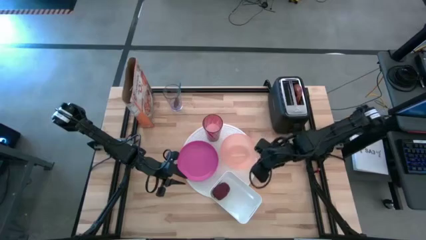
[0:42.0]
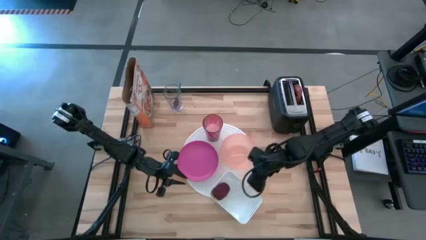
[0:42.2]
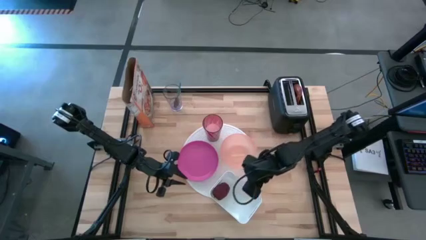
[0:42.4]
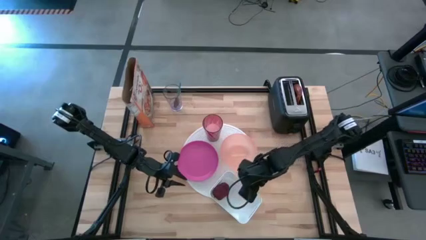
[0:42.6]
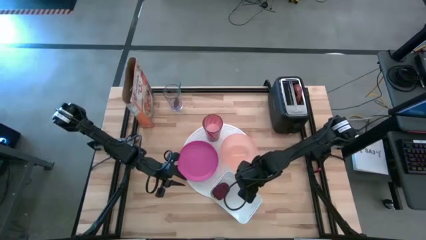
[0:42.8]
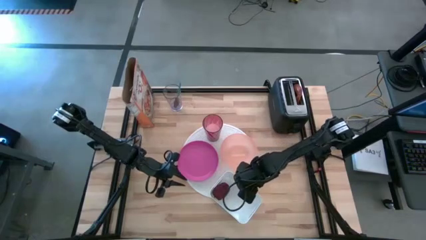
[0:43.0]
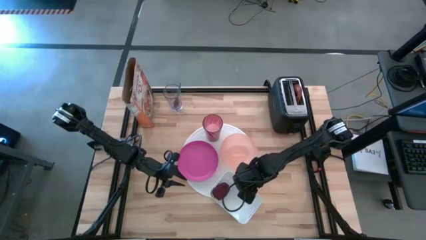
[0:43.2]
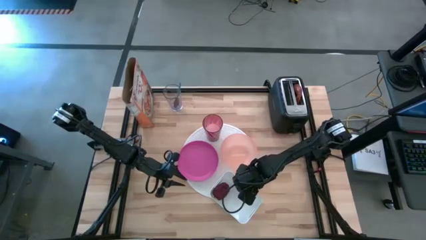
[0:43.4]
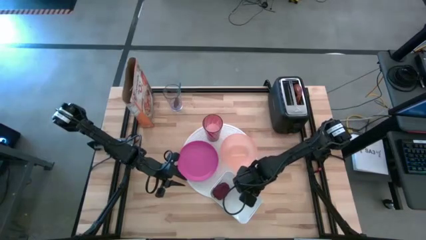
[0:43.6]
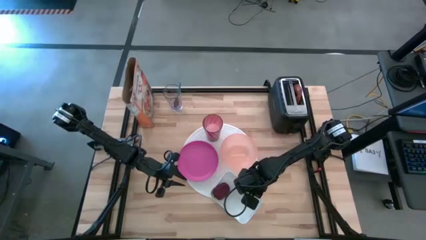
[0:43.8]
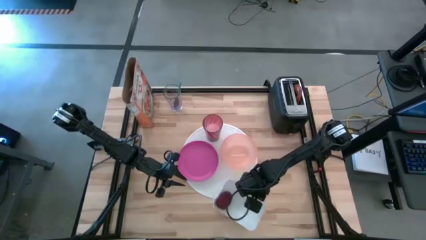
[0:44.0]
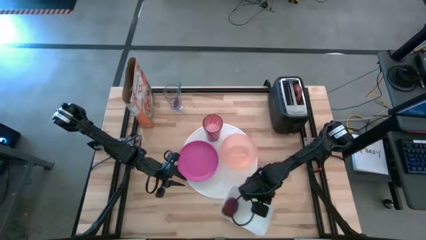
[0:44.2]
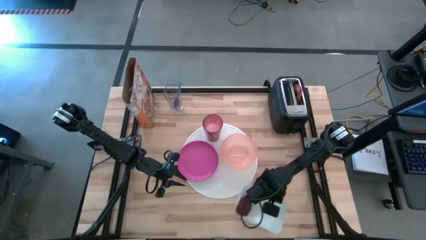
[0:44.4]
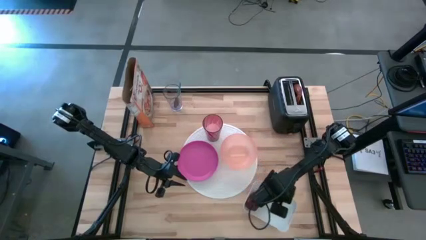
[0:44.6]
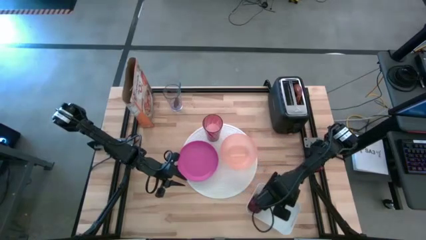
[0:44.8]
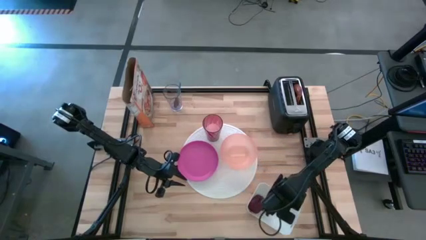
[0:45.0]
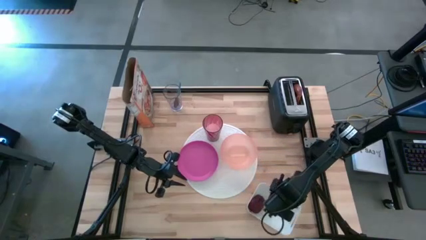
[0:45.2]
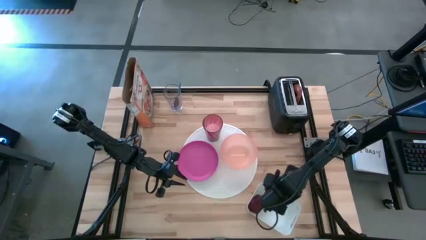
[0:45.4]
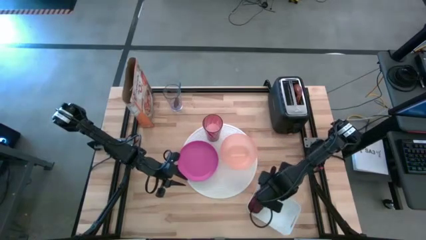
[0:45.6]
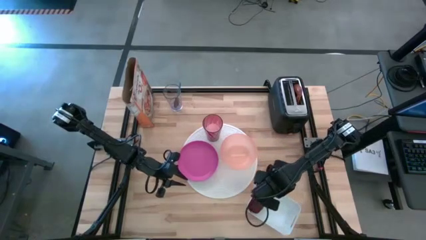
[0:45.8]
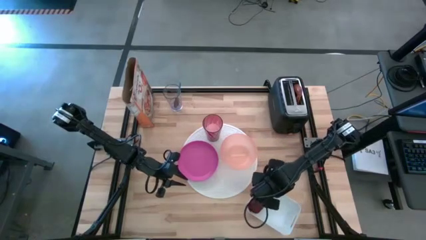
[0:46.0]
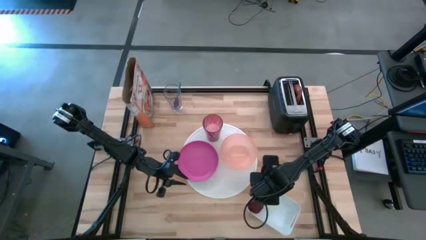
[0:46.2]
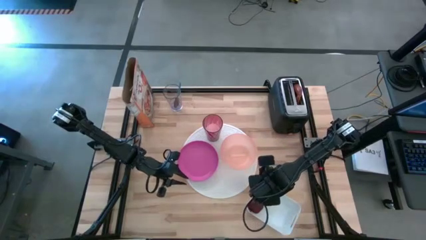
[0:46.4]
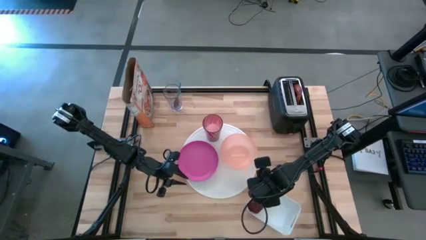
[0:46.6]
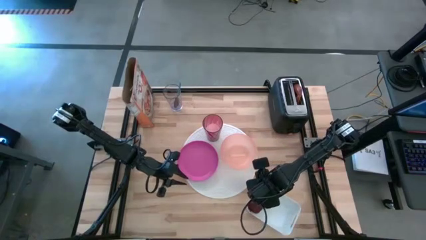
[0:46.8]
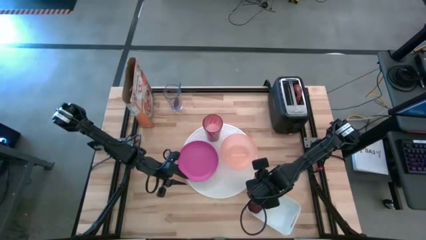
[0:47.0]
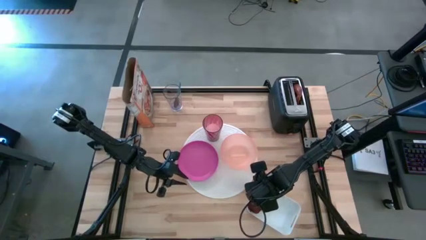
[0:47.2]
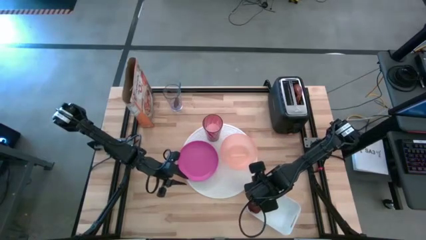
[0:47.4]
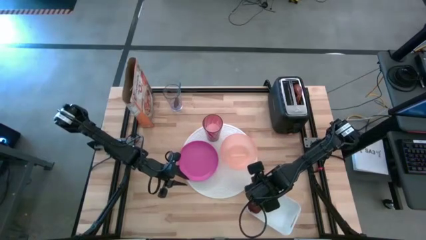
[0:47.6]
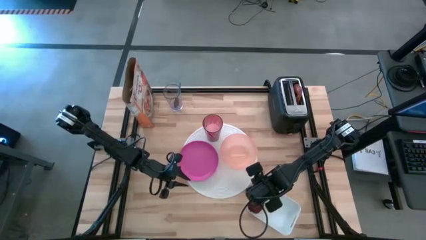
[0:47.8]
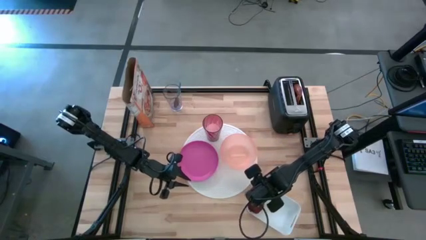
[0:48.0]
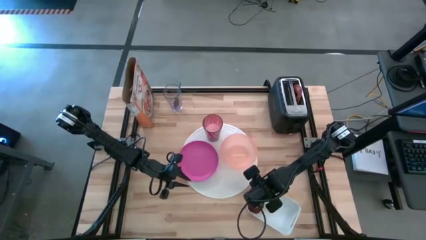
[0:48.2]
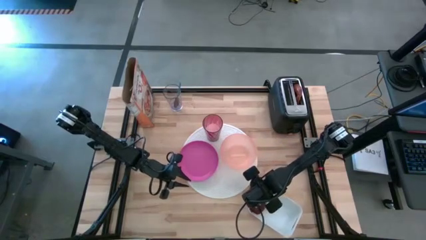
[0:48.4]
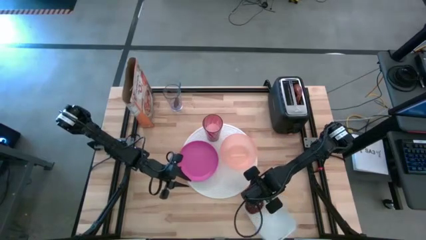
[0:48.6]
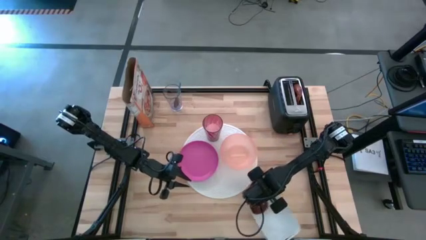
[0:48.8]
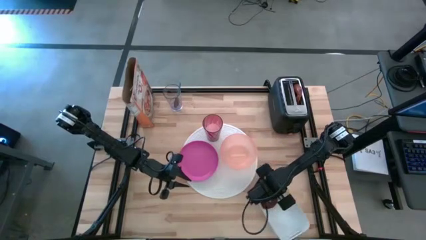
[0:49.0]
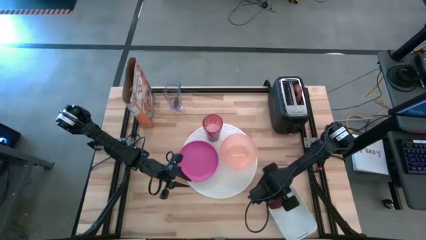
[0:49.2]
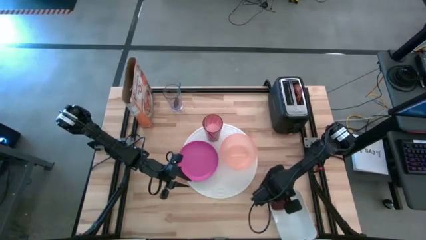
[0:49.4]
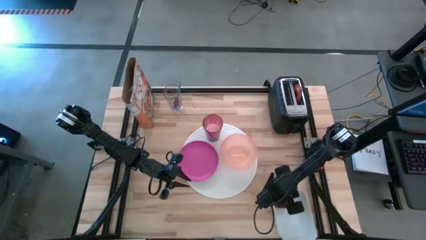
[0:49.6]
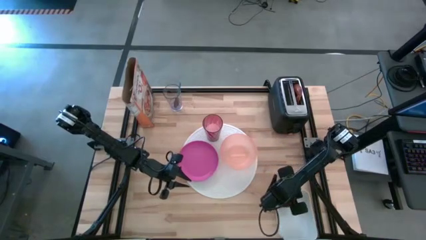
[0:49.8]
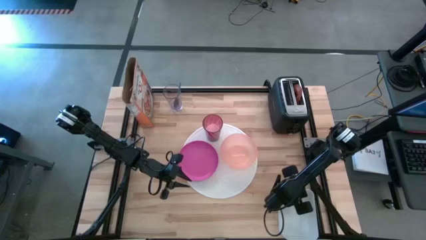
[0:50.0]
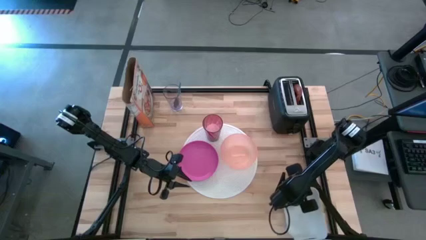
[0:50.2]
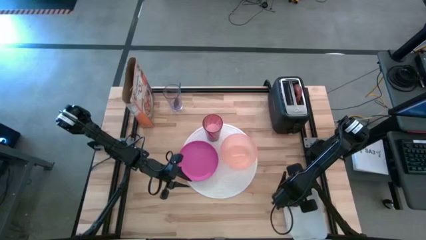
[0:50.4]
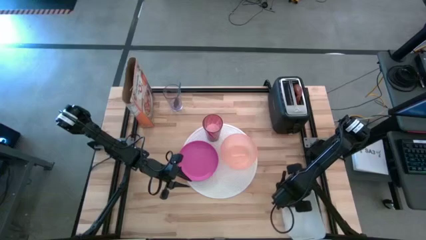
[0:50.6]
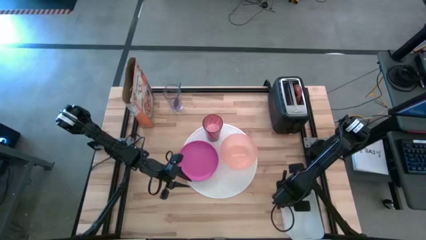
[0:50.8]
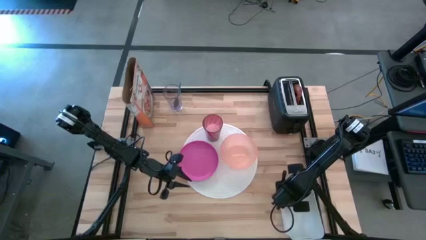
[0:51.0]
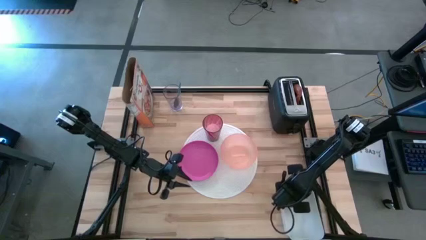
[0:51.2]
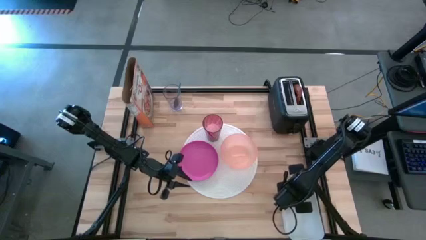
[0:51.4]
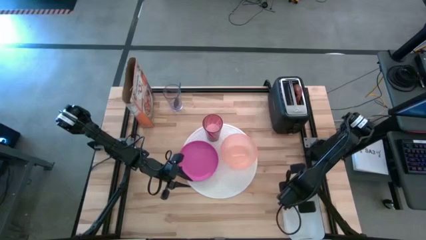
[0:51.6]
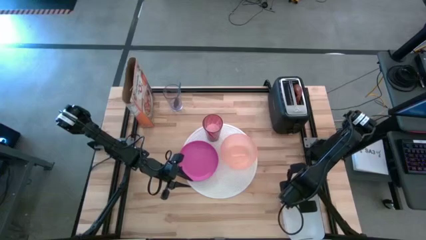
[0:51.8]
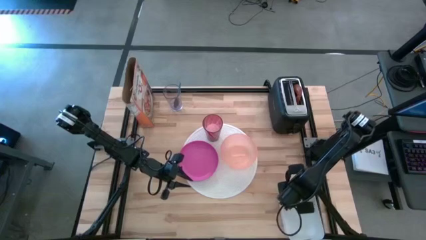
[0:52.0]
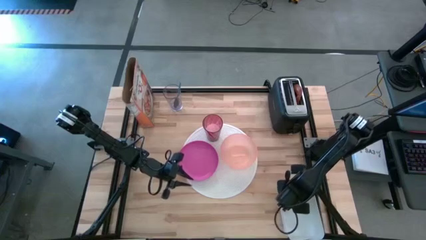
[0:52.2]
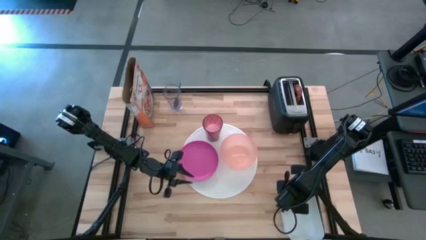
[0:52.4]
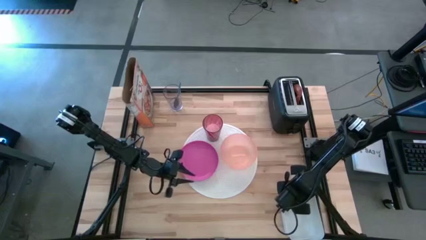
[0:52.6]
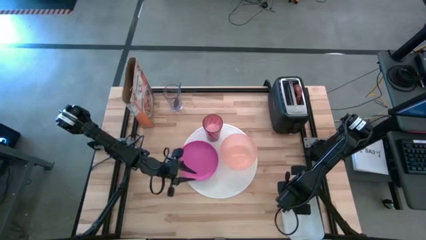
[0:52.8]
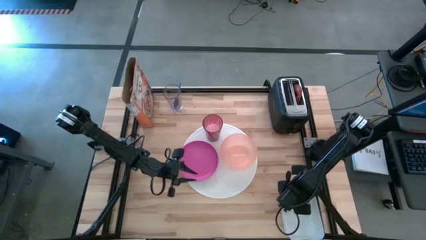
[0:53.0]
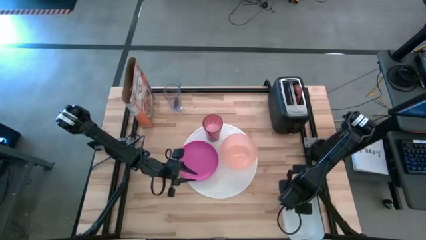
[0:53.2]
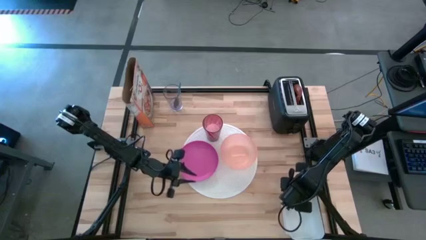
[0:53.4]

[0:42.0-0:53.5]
Task: Arrange a breakfast setting
Move the white bin to the bottom right of the table
